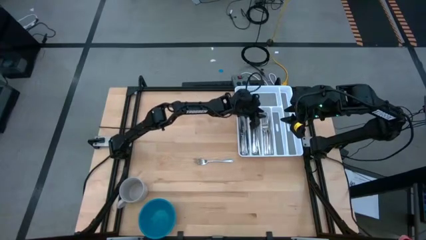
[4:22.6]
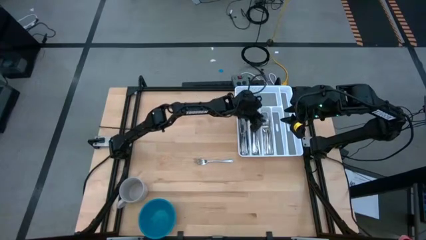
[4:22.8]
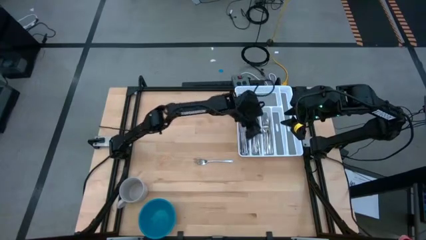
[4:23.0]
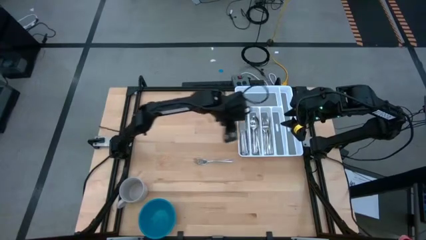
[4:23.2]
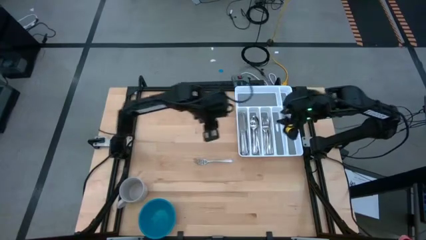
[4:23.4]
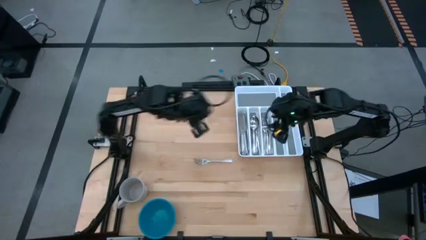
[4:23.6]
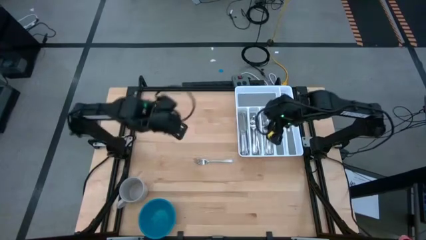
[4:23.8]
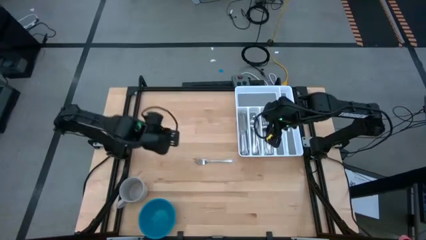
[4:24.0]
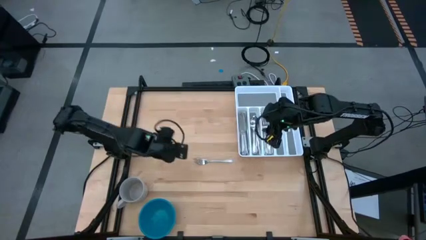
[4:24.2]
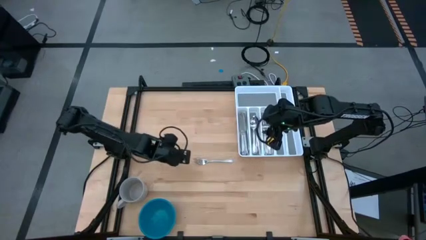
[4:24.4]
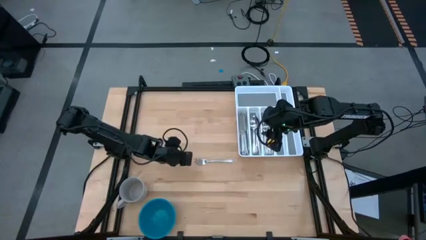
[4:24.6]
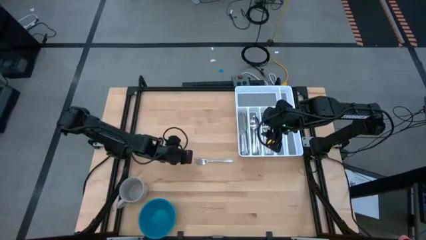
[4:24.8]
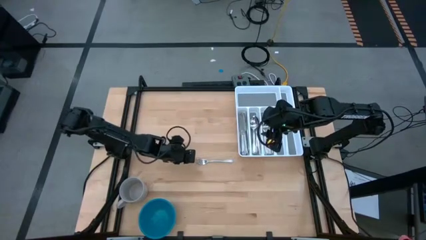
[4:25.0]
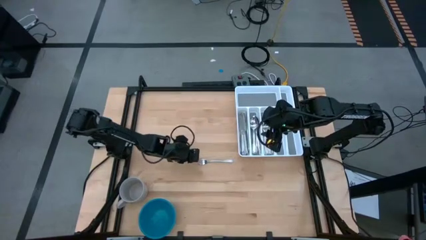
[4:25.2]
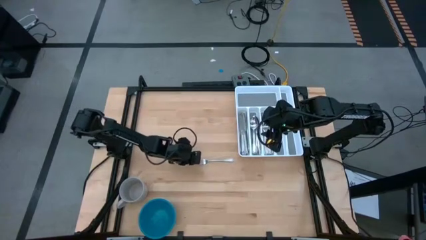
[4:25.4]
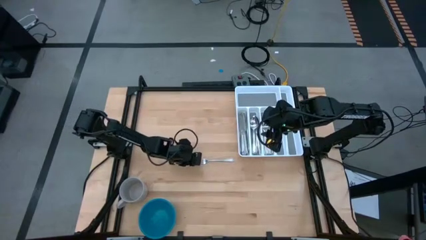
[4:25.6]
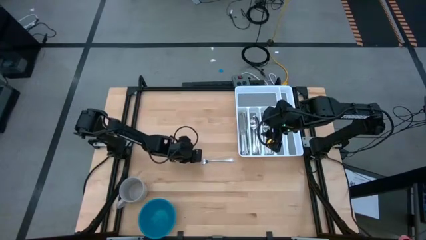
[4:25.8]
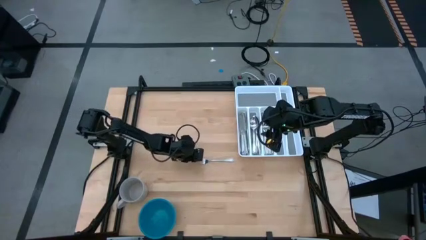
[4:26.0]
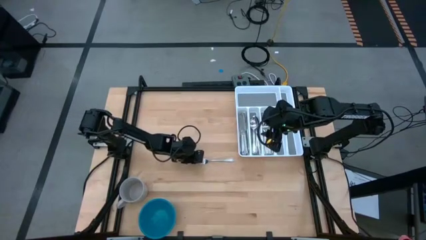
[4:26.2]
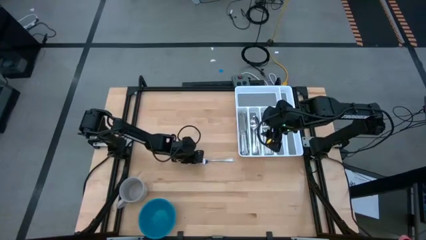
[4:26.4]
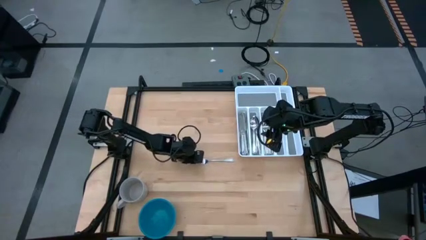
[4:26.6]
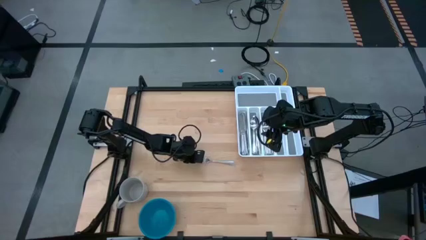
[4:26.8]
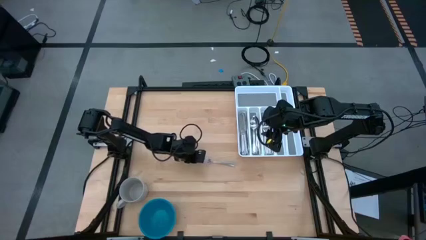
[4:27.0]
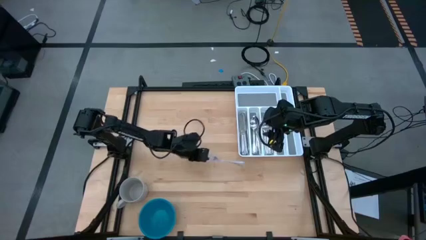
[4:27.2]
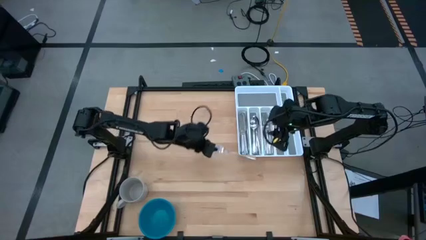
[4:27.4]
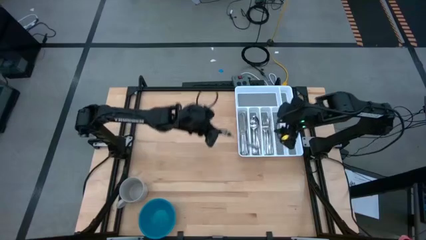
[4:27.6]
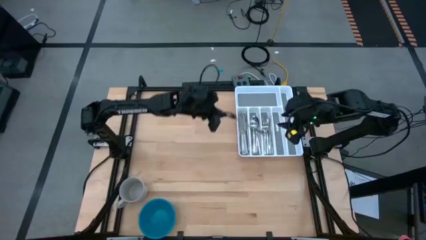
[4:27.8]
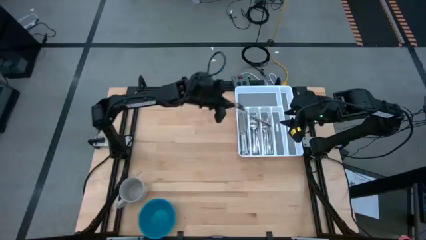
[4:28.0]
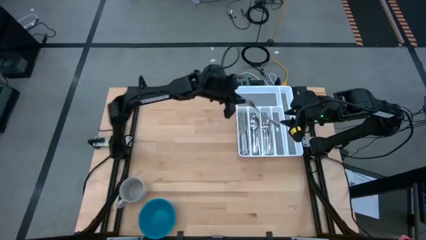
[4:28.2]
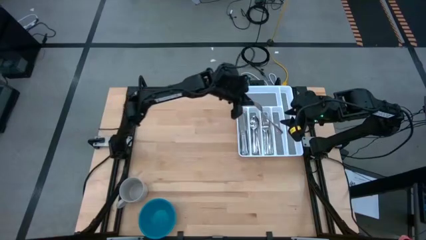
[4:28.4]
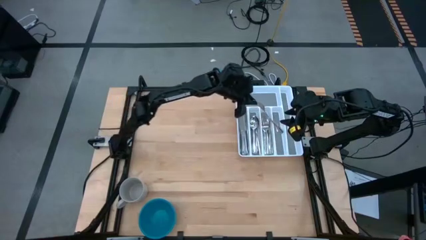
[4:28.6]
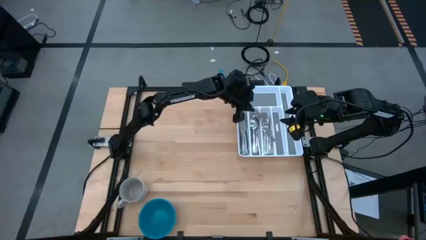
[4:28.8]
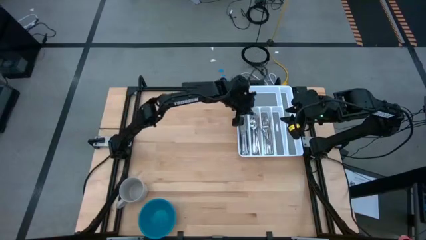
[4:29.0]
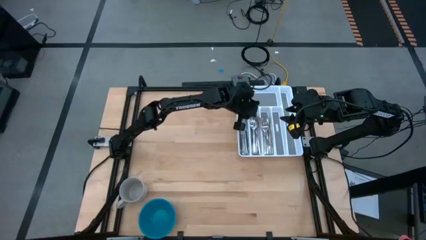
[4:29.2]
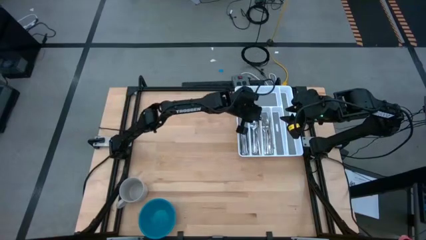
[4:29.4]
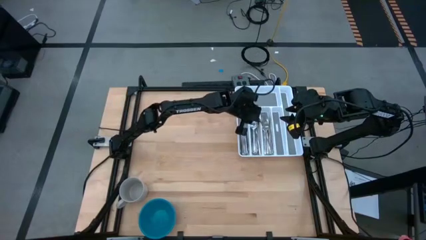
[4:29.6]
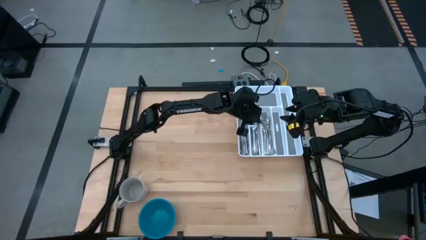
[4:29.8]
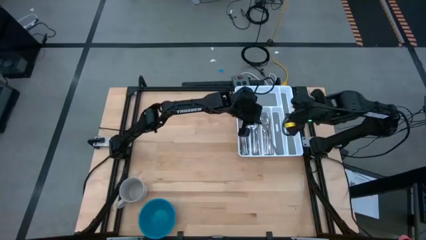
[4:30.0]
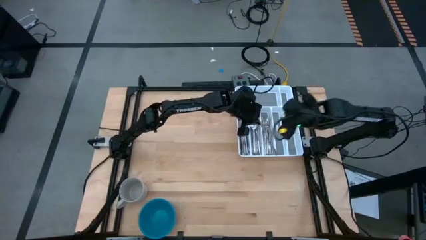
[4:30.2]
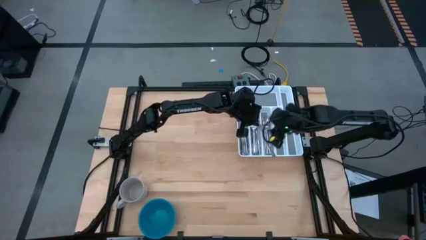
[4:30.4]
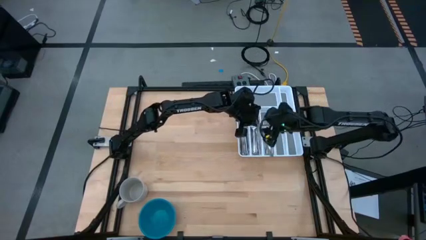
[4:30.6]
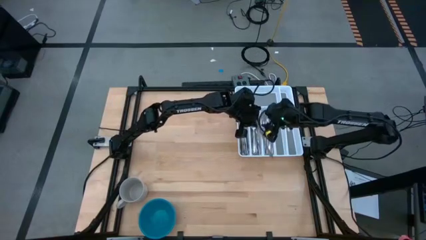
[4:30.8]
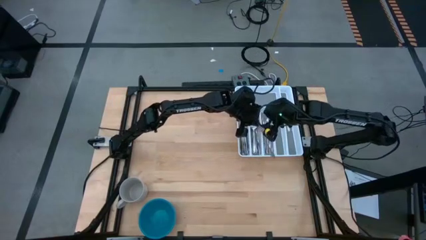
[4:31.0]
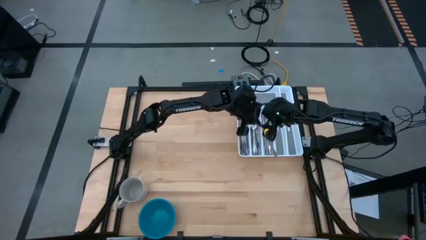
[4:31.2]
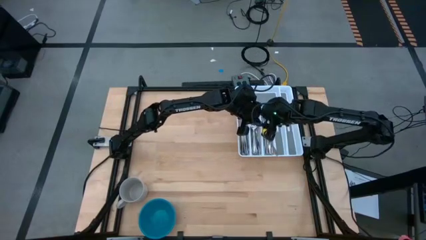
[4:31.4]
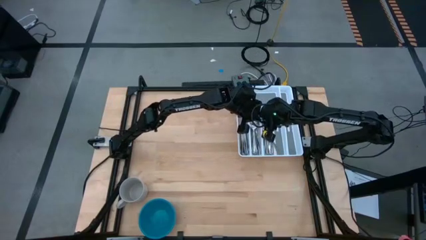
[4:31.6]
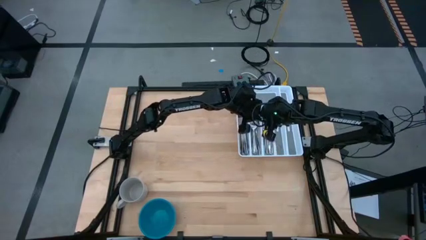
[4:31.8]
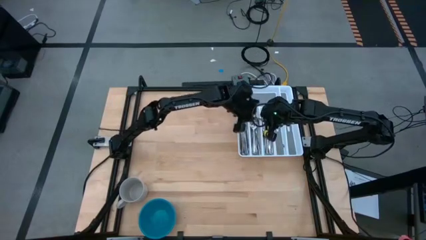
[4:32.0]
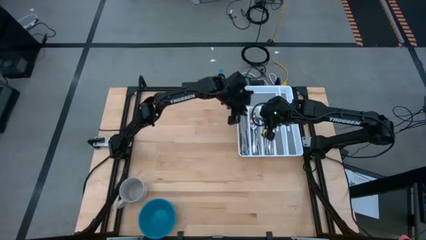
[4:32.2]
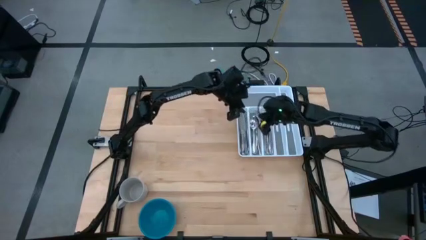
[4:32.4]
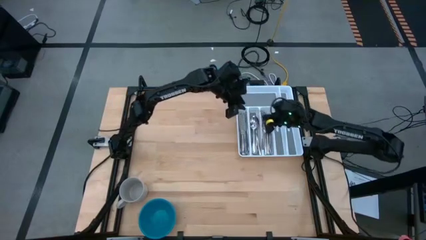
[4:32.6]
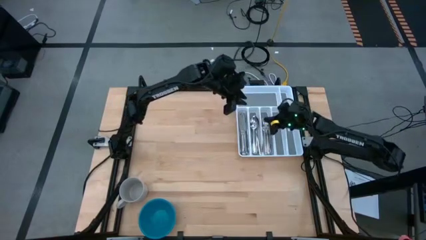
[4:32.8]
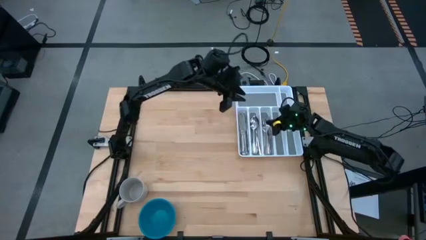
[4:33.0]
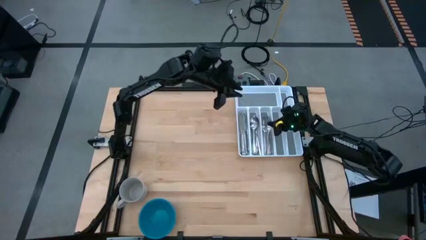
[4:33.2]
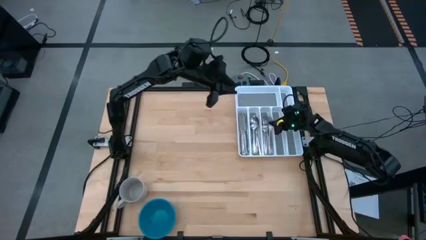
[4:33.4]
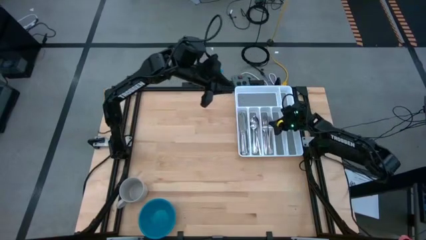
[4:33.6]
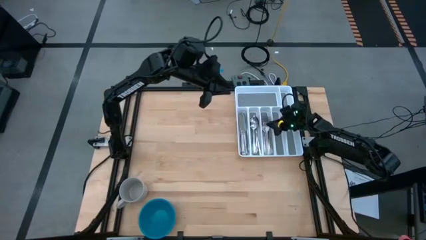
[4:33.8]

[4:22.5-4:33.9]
Task: Sort silverware
Put the fork into the silverware tray

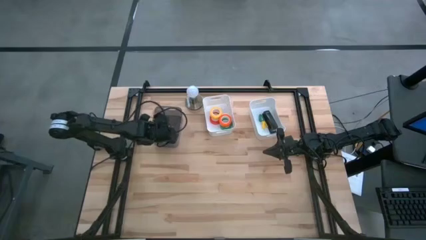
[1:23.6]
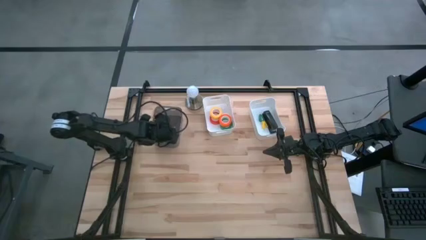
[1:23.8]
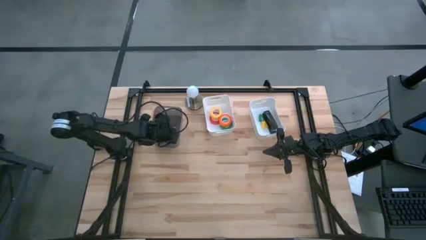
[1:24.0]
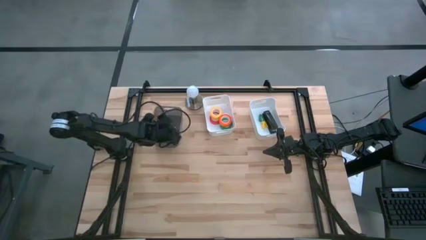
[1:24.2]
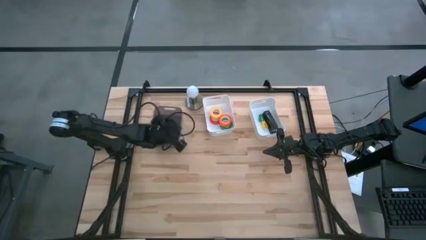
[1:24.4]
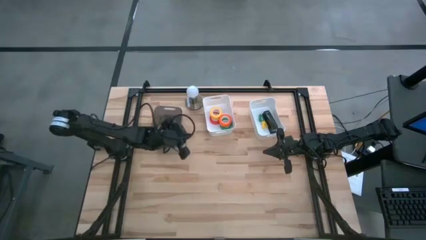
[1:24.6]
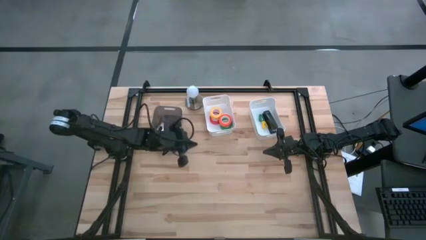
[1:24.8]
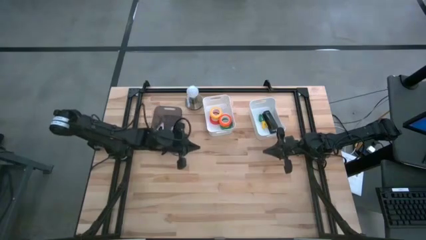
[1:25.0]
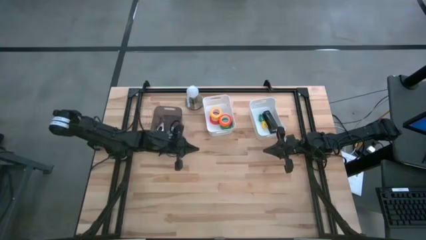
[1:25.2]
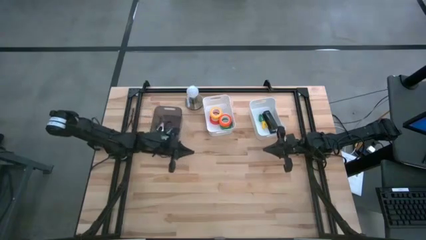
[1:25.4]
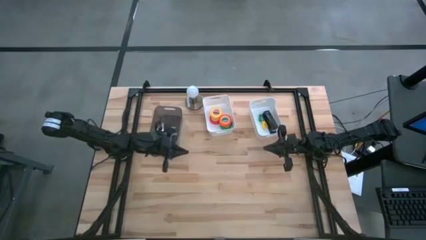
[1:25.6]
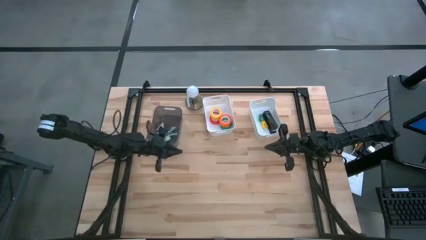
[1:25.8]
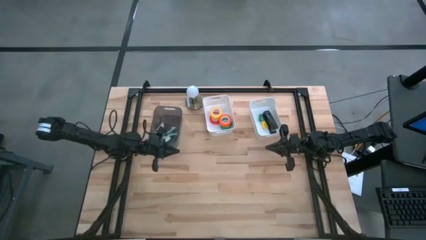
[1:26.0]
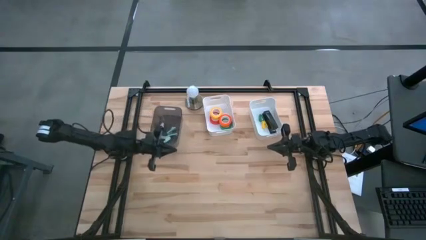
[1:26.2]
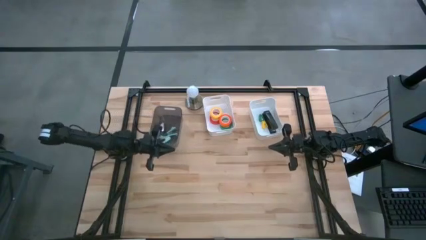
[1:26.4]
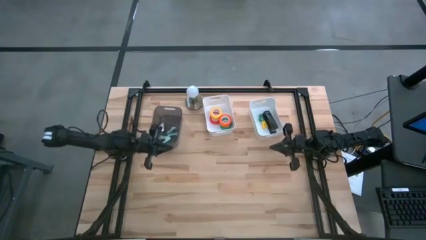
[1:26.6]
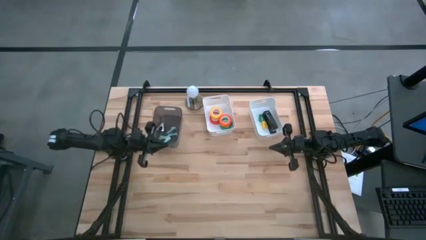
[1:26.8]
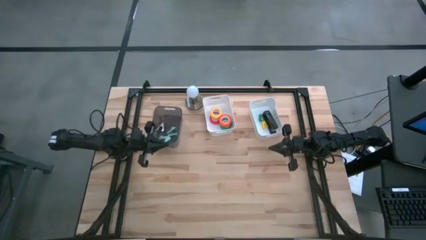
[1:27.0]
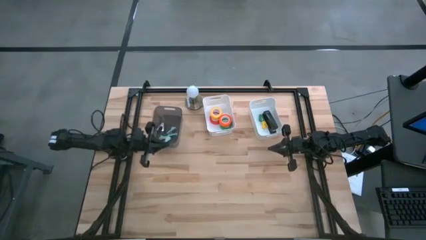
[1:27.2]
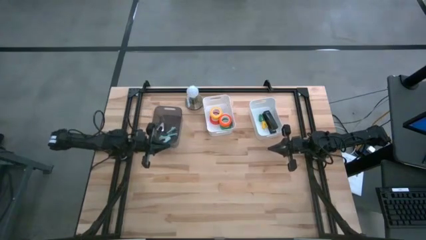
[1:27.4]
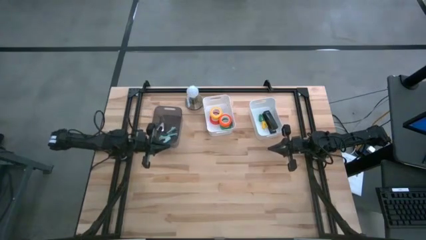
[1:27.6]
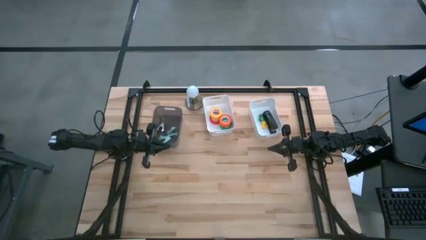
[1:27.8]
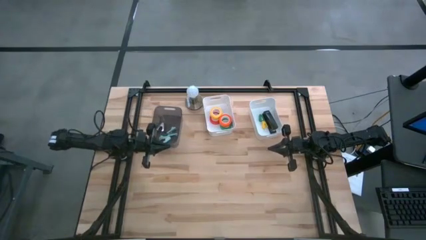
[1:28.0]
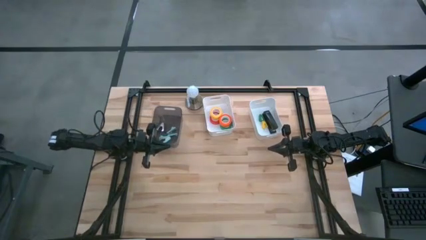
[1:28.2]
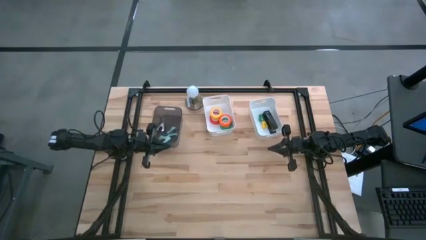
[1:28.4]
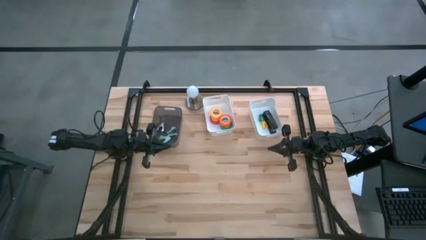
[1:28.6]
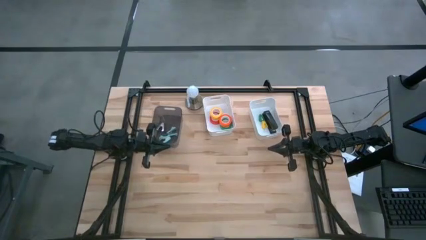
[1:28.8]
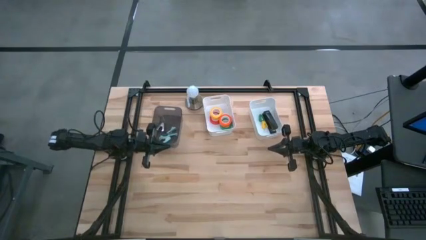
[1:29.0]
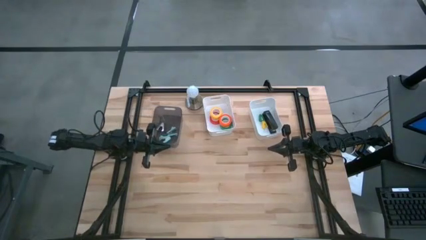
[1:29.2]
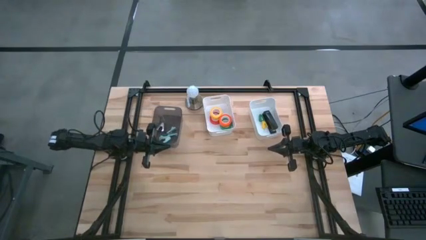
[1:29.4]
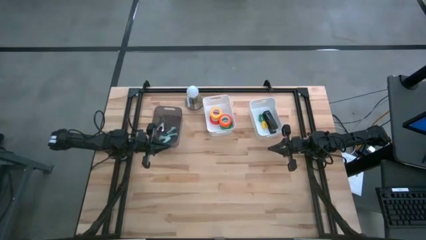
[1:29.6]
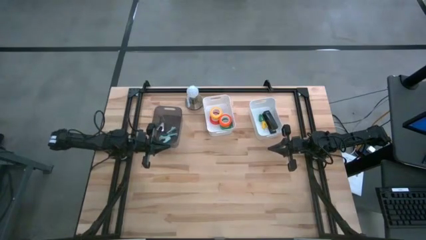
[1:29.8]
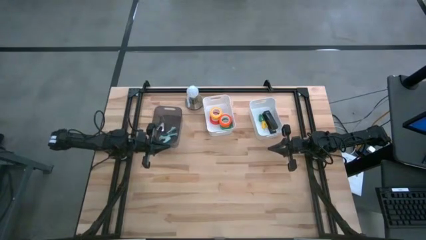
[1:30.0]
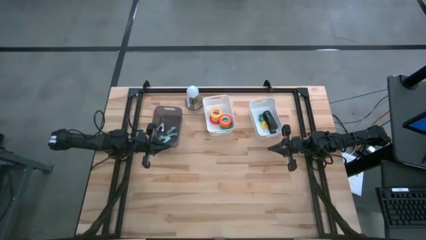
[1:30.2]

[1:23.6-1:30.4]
Task: Pick and place Stapler, Stapler remover, tape
Return to home position
